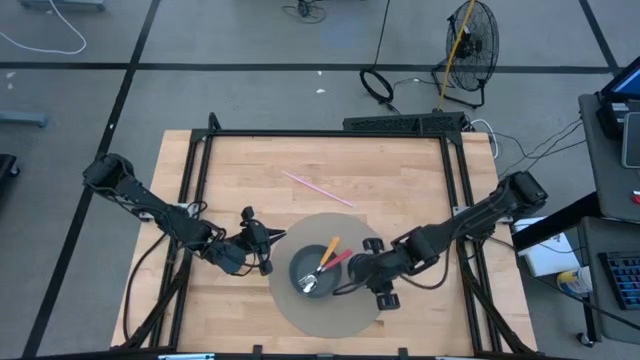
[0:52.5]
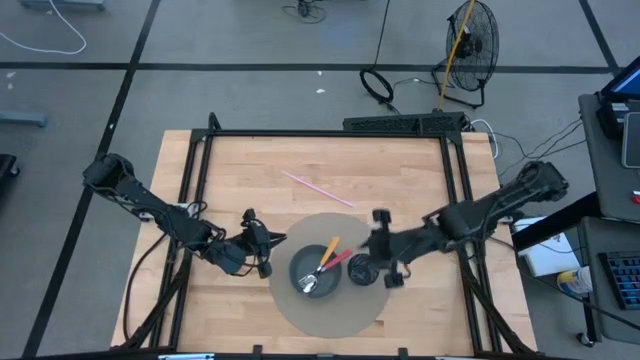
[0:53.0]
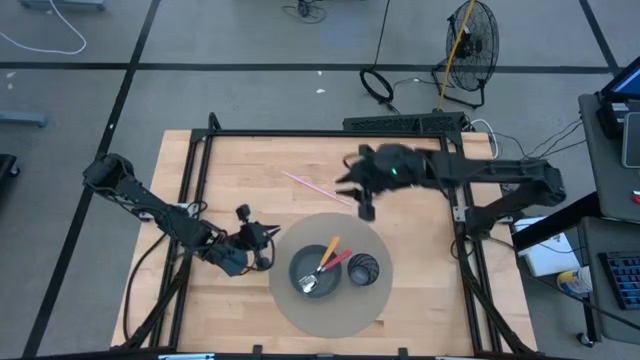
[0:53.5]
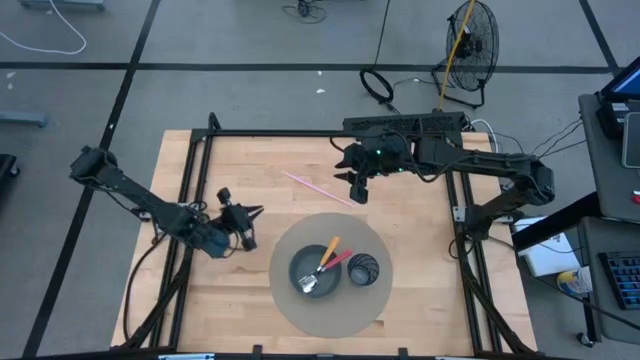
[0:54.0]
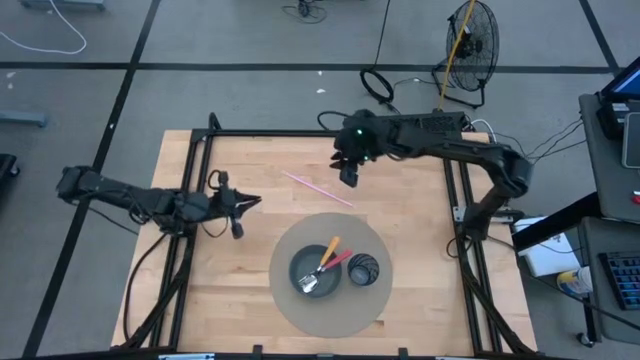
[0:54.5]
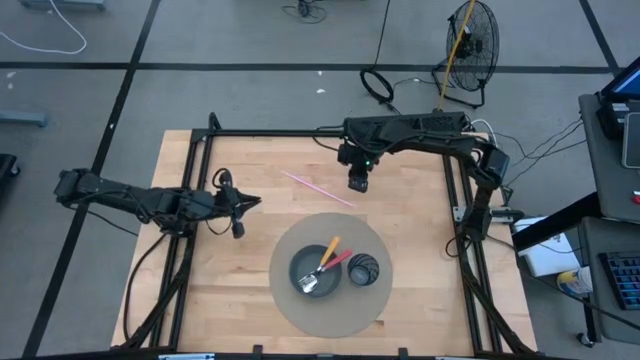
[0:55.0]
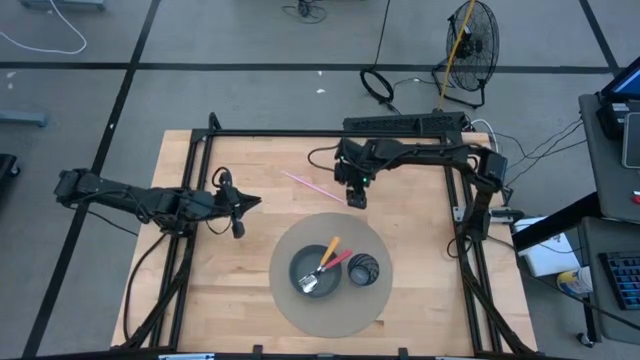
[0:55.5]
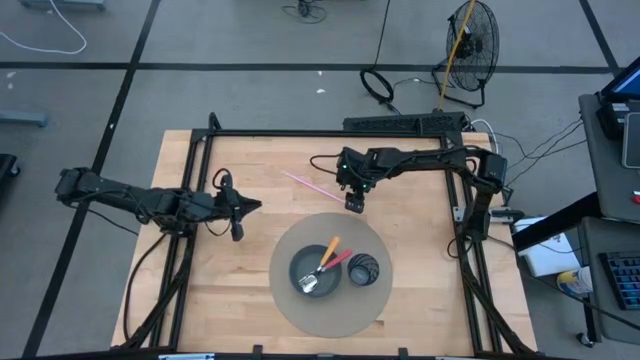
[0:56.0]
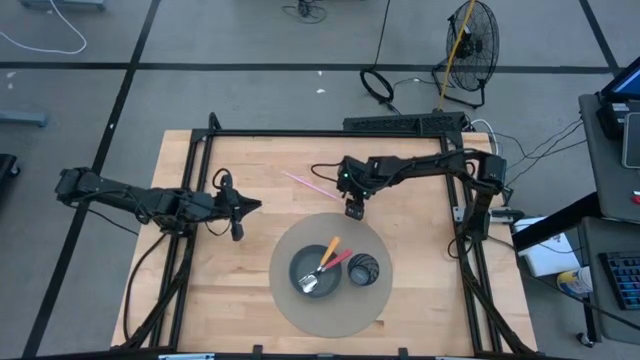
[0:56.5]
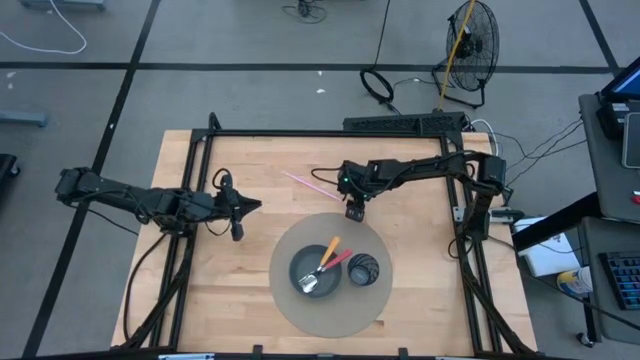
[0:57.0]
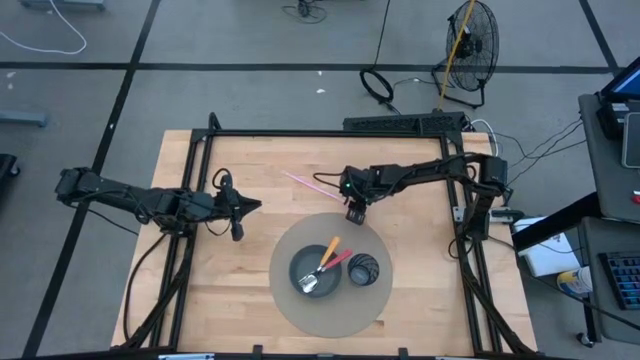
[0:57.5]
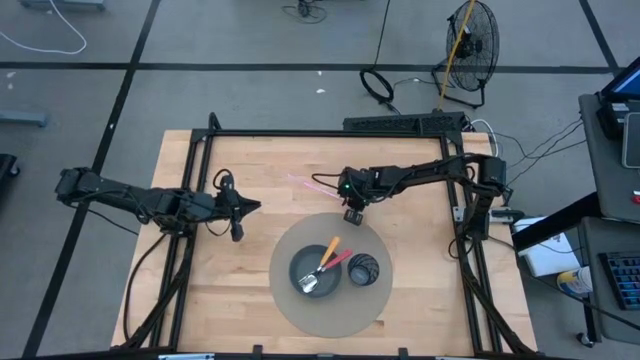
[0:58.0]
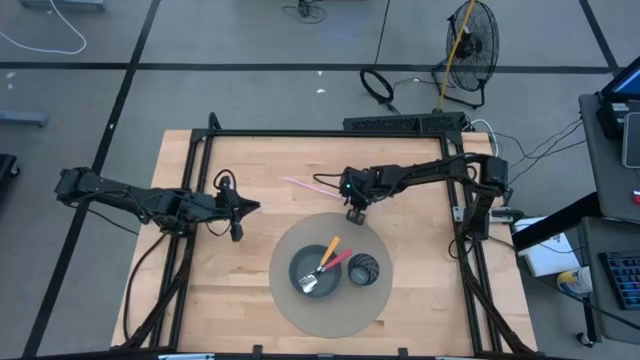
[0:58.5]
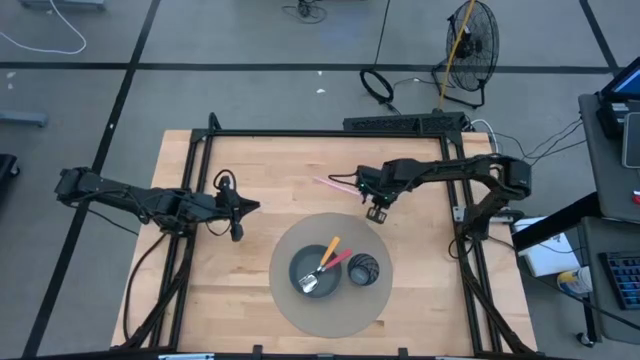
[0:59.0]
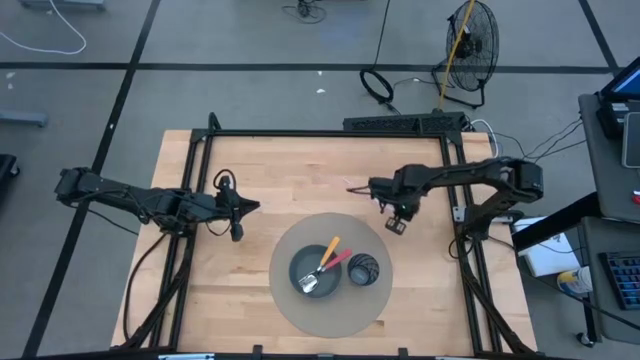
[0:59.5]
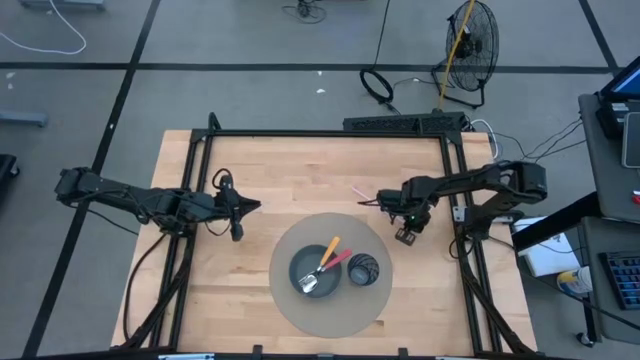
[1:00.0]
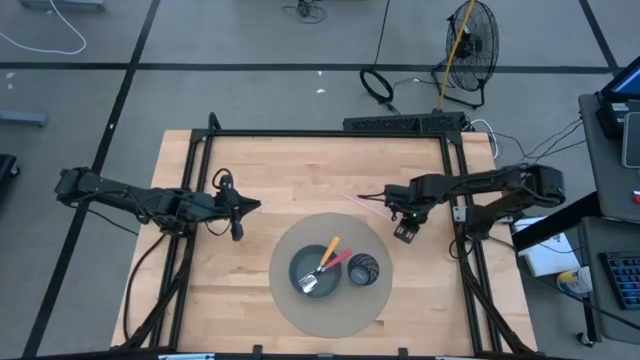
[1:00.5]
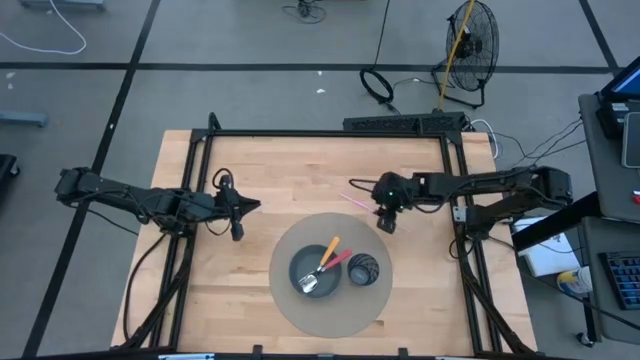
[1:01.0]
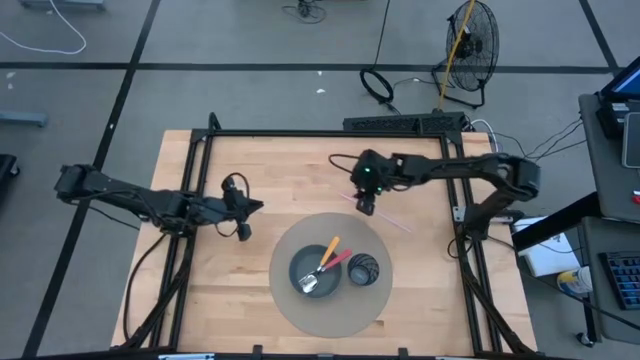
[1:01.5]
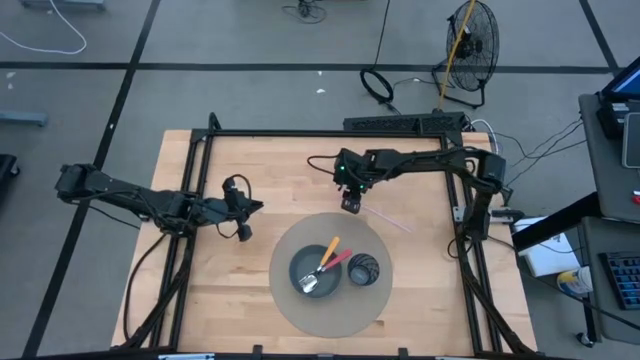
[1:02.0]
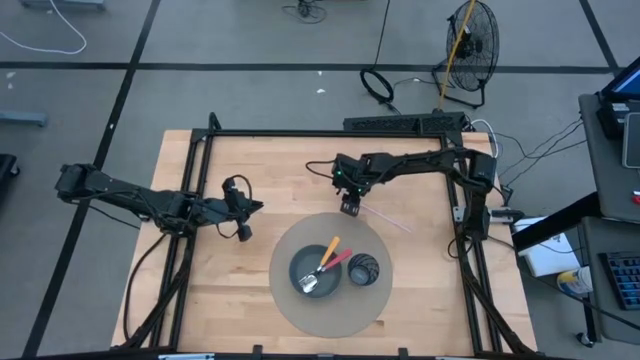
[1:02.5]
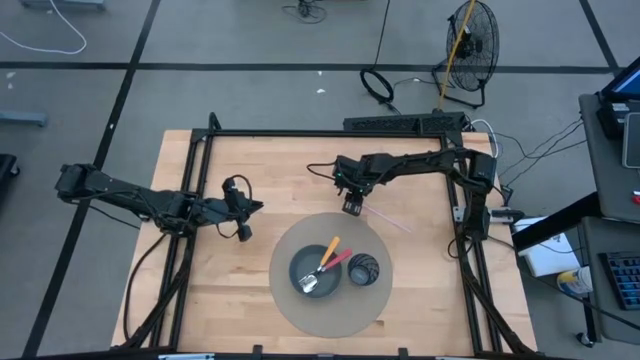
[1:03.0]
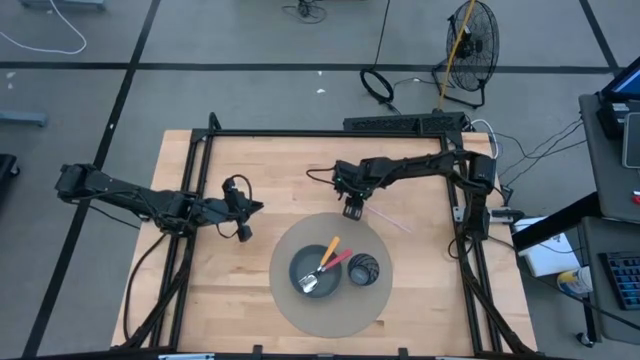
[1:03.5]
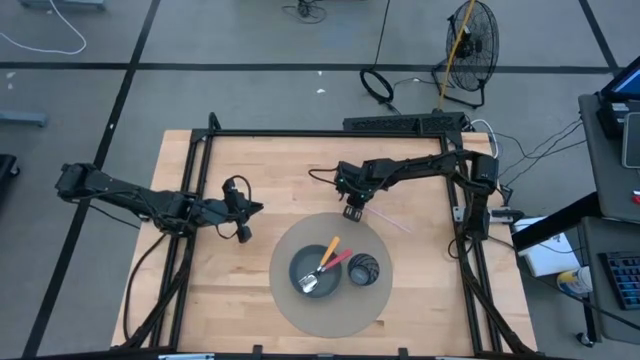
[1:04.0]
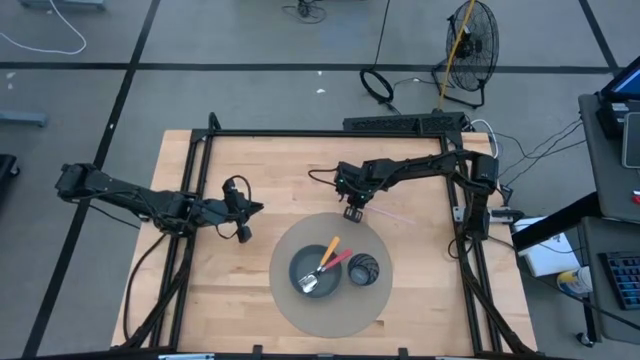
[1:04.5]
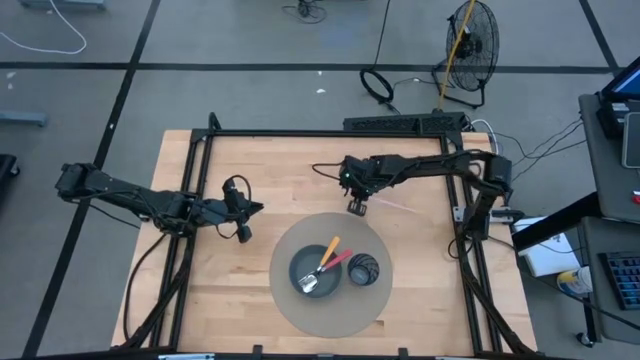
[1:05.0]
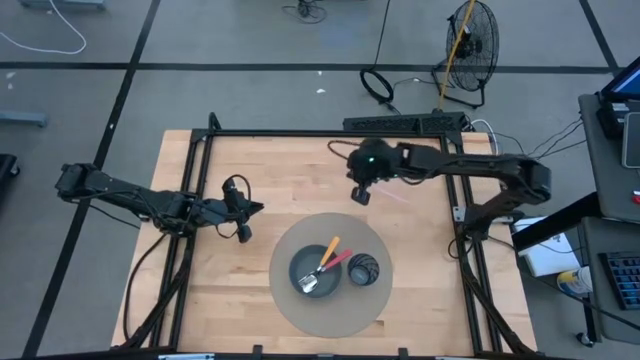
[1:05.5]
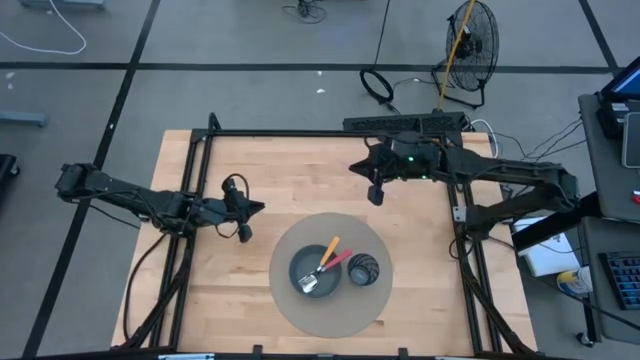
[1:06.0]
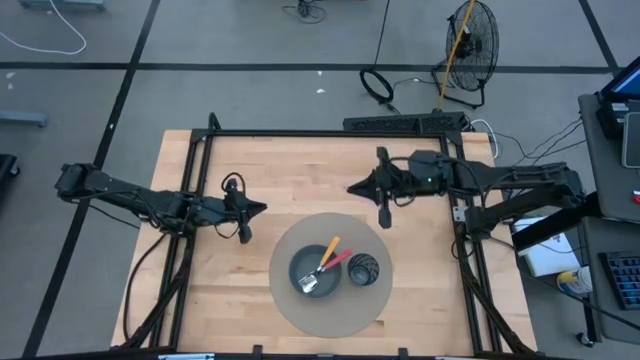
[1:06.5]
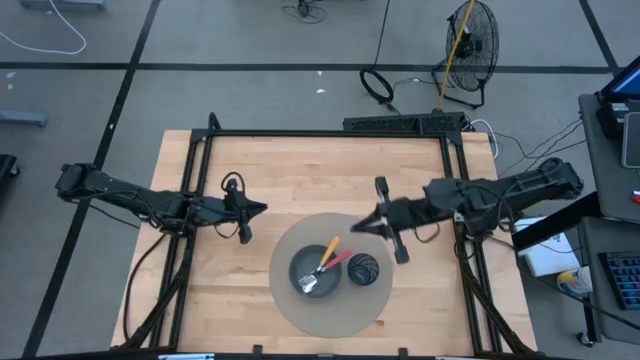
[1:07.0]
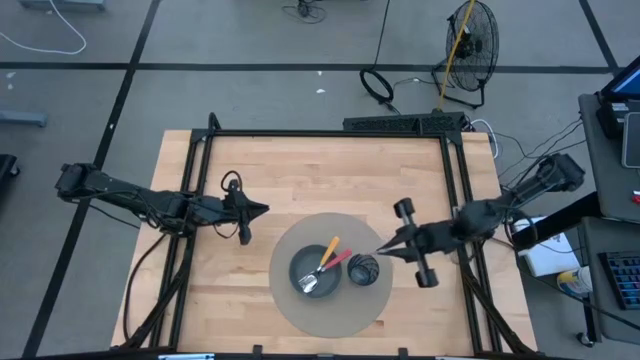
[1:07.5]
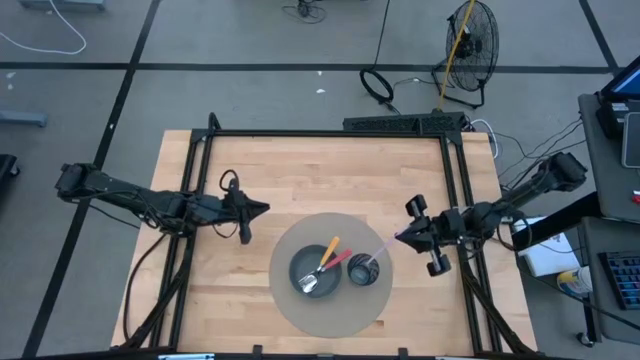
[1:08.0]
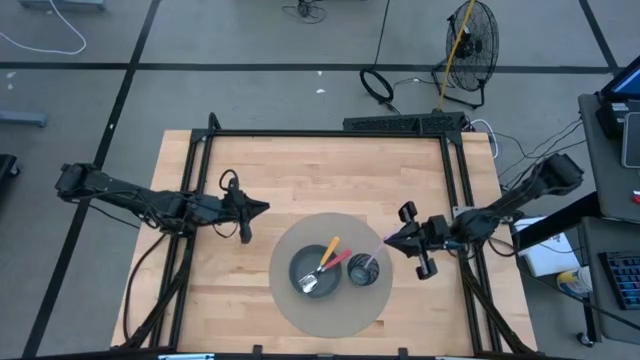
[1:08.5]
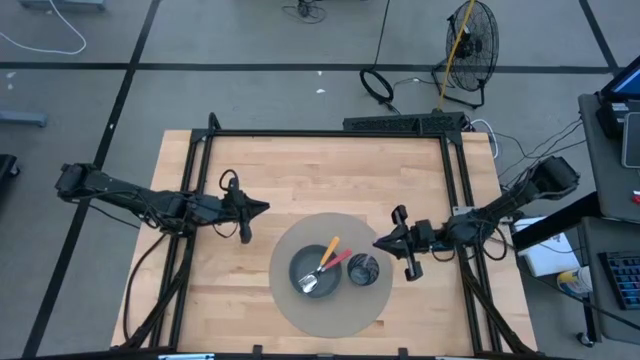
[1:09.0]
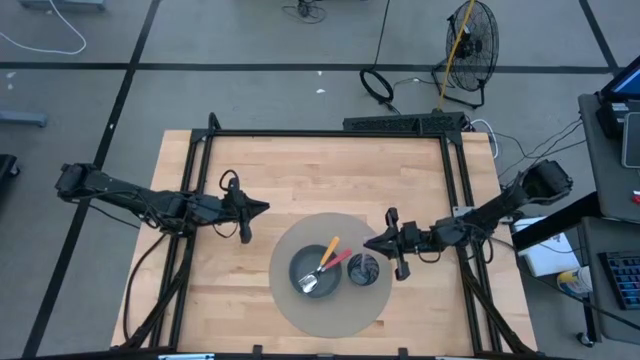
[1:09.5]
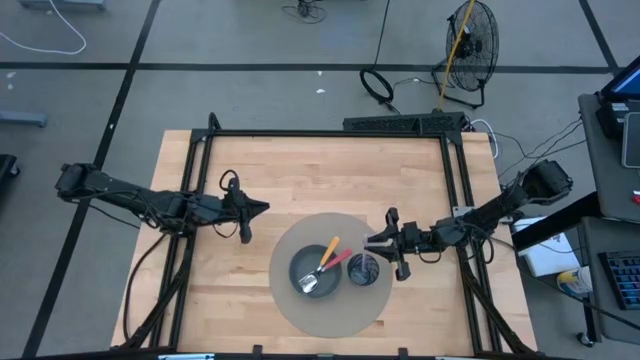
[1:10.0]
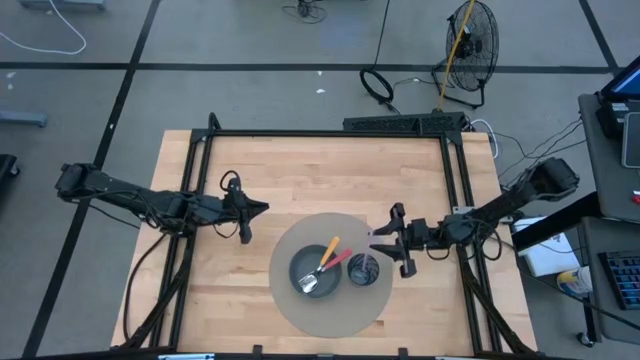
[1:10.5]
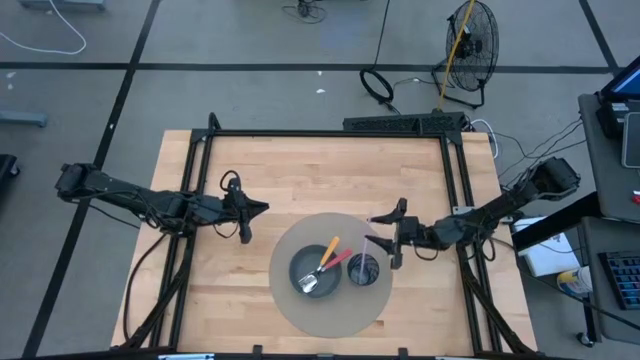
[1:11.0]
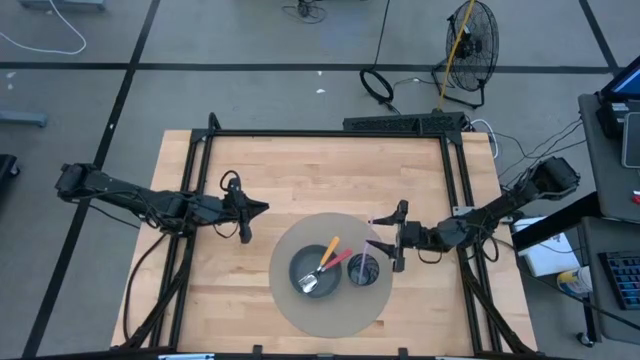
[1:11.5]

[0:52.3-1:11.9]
Task: Pick & Place Utensil
Put the pink straw into the blue cup on the brown placemat
